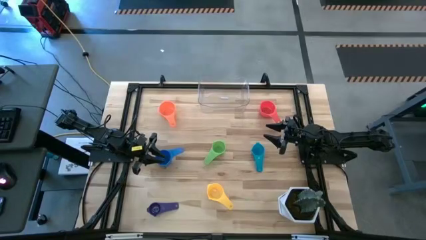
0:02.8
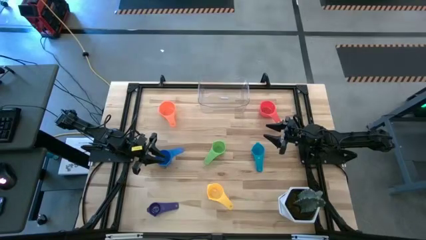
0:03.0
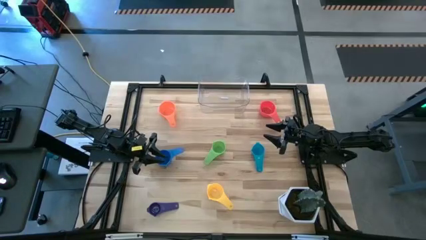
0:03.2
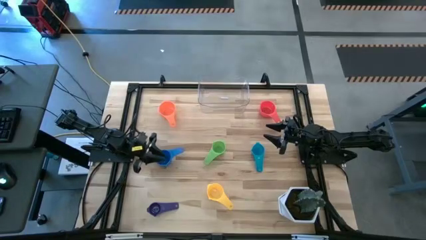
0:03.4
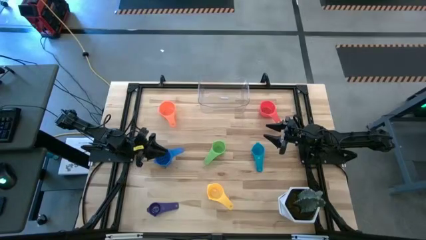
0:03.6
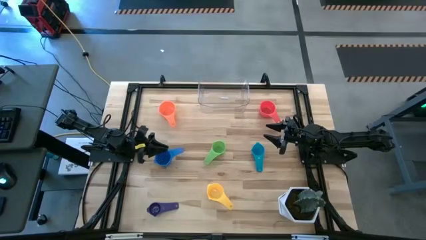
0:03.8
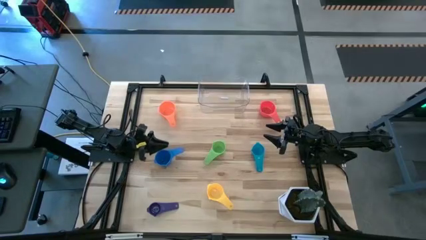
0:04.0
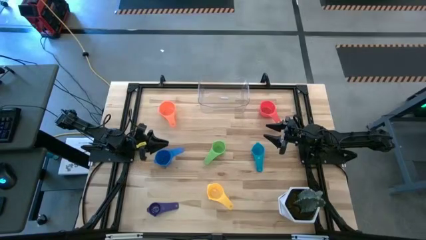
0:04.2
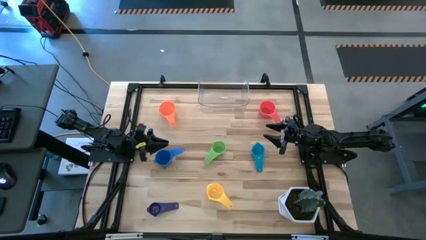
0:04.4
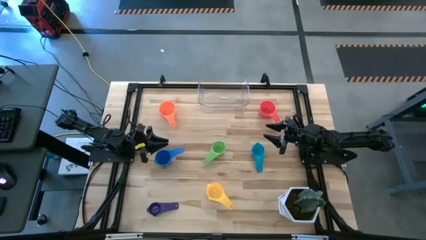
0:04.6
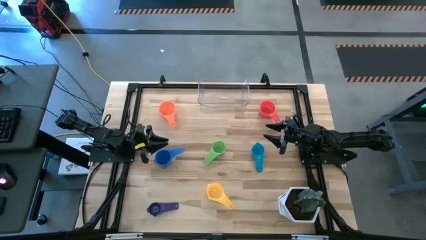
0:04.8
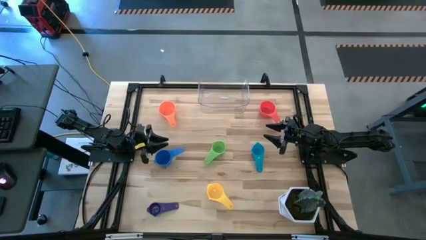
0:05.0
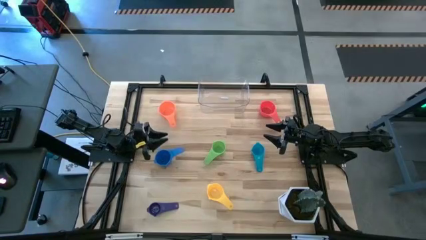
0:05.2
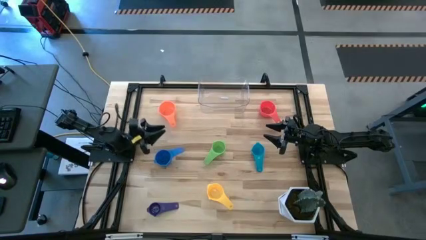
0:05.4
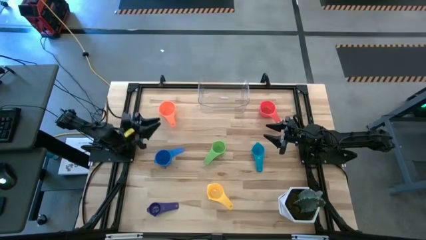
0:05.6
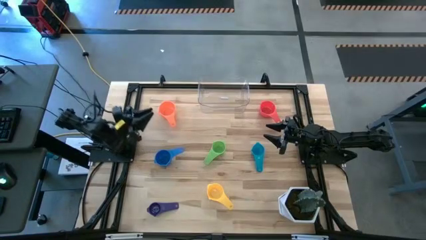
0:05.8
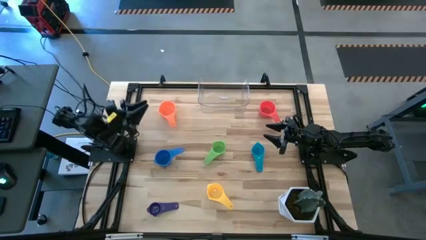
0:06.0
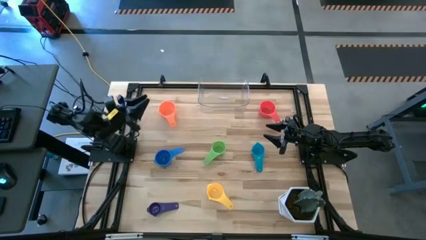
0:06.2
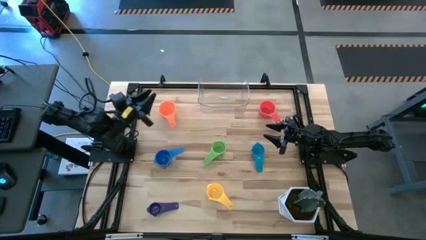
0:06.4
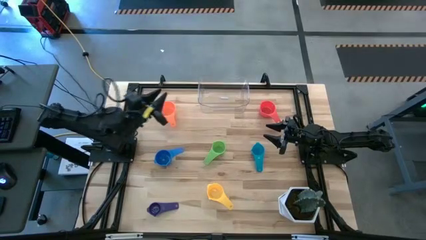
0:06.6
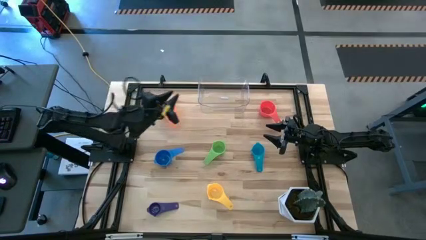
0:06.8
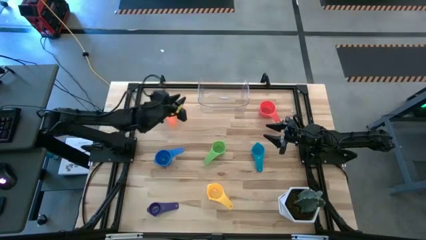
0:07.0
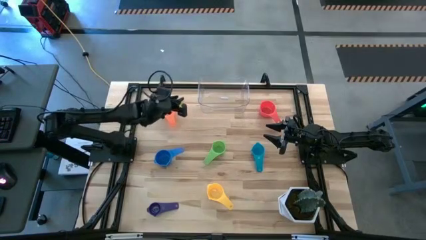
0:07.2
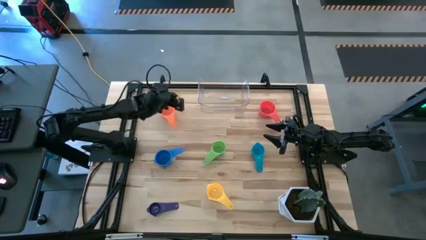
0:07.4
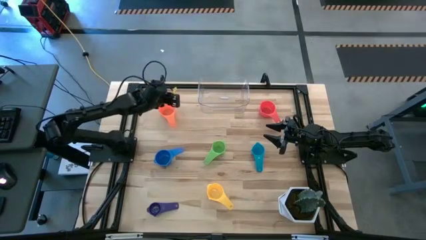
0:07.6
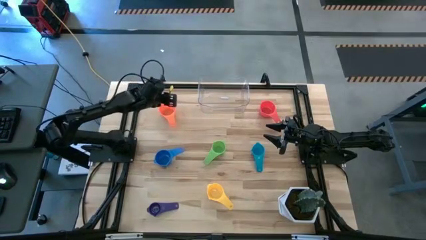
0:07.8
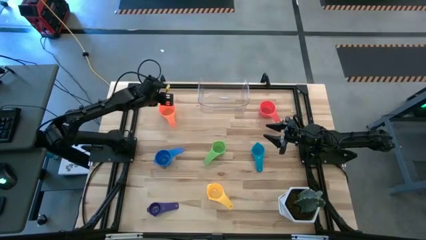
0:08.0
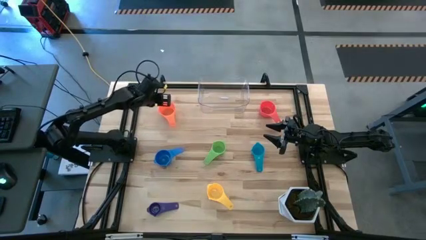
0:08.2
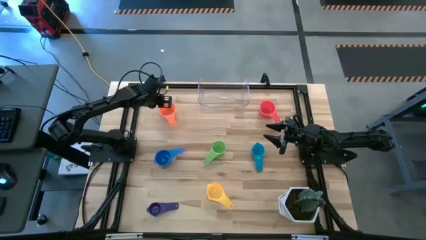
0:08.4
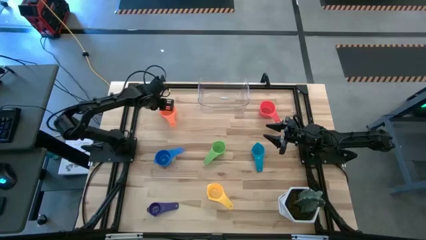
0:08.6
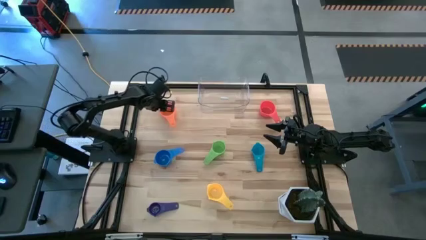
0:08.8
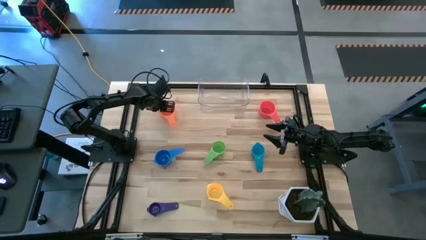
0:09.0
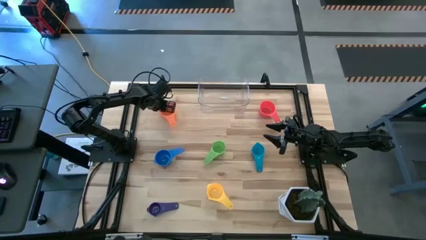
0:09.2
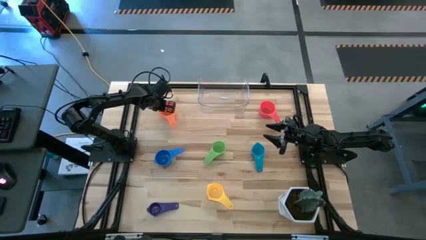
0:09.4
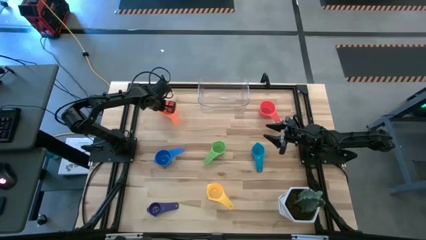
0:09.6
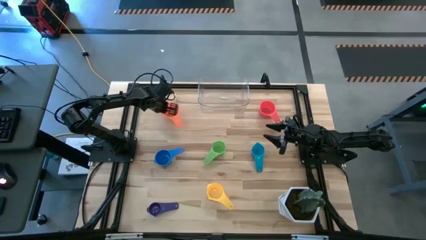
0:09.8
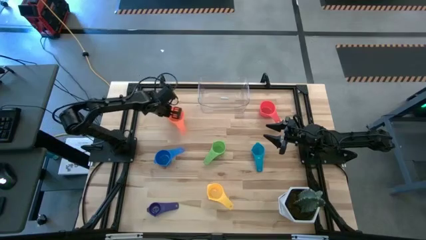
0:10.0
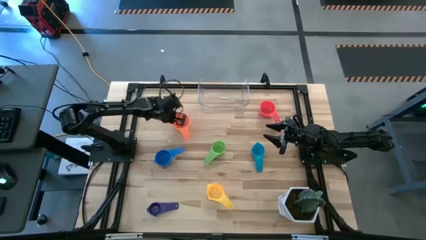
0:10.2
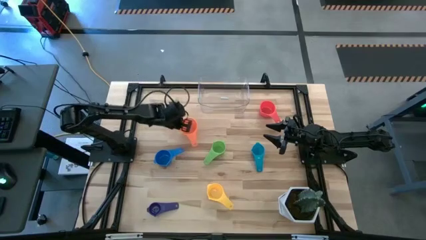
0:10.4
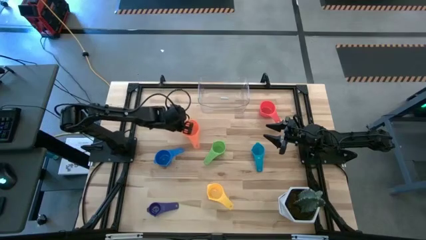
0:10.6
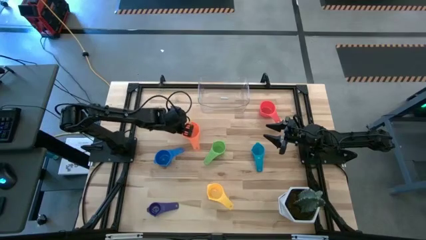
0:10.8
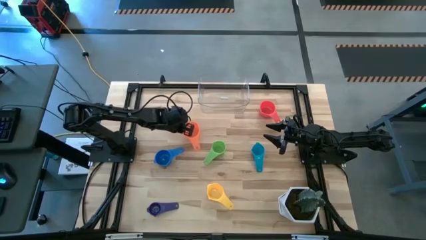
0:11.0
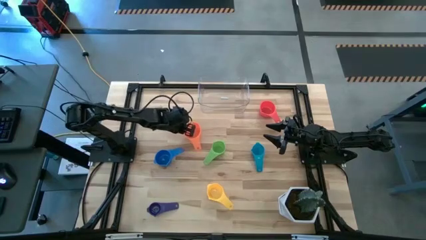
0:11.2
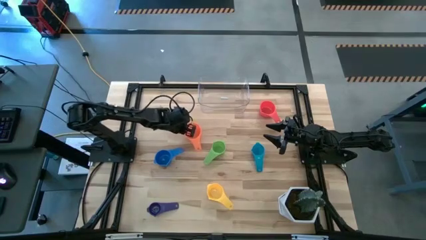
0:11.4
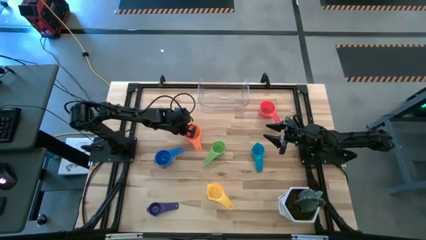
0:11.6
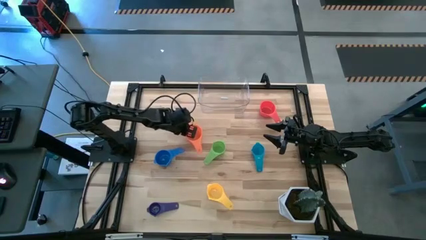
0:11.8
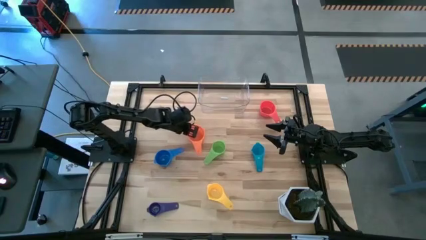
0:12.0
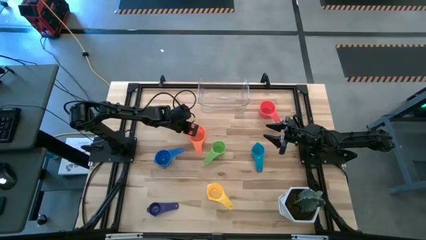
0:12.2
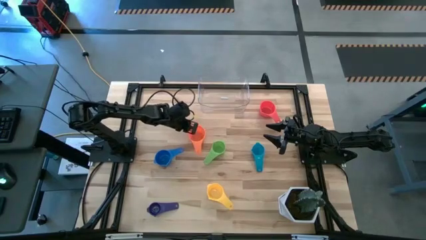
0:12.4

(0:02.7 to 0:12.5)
Task: Nest measuring cups in basket
Move the orange measuring cup to the middle of the table

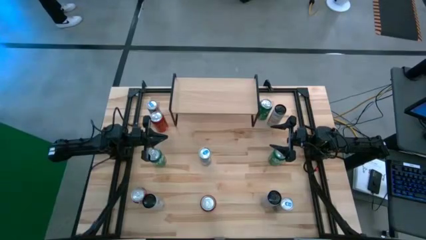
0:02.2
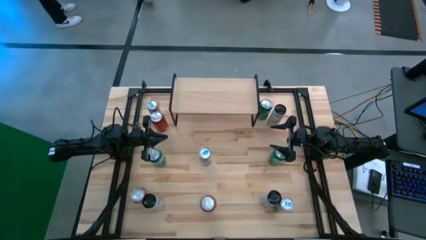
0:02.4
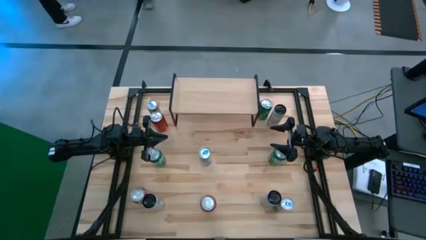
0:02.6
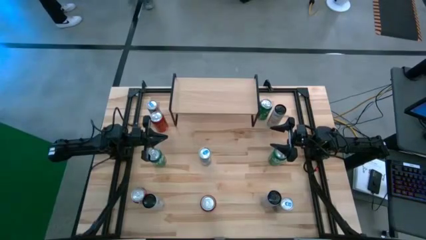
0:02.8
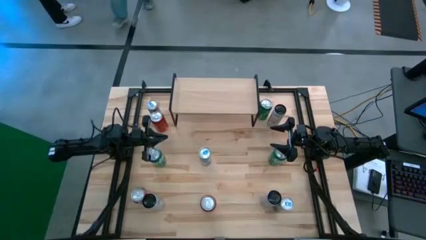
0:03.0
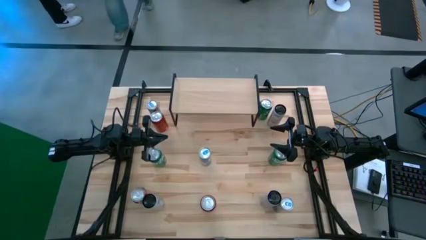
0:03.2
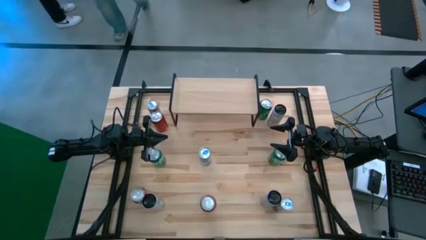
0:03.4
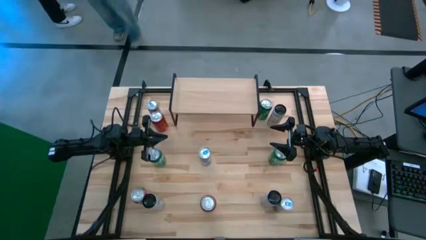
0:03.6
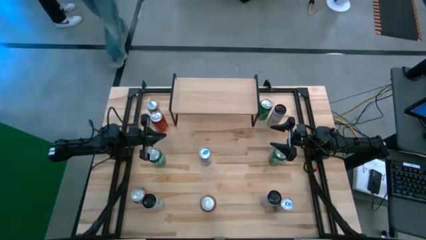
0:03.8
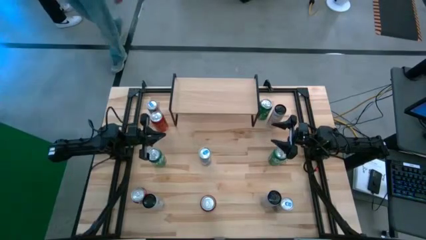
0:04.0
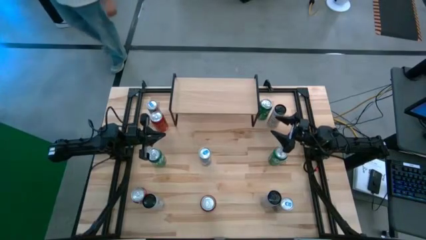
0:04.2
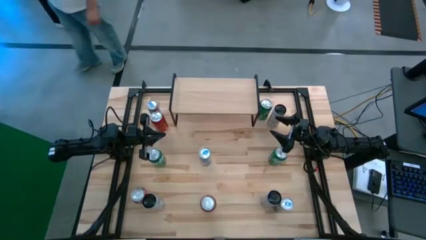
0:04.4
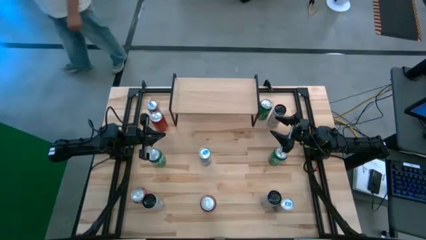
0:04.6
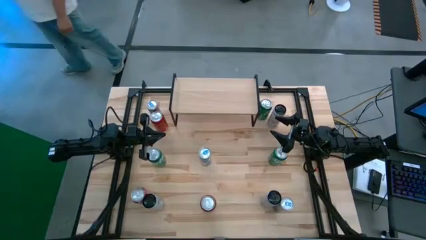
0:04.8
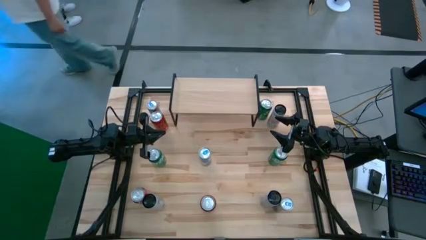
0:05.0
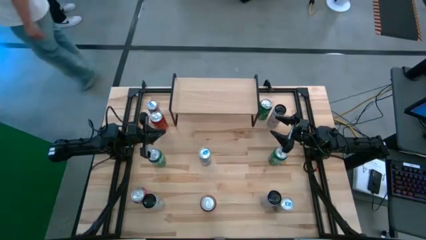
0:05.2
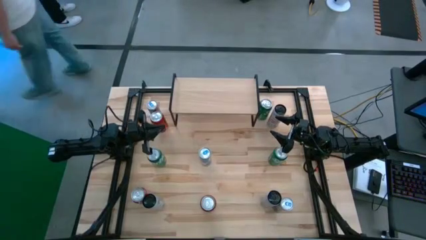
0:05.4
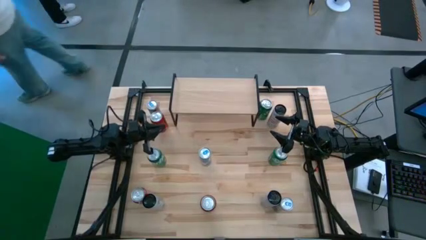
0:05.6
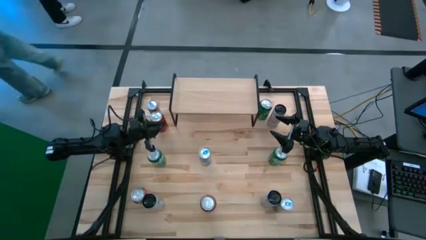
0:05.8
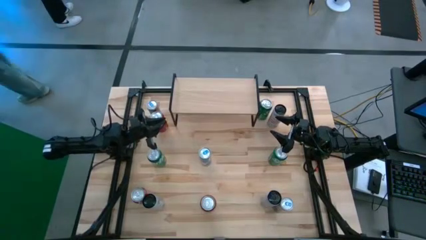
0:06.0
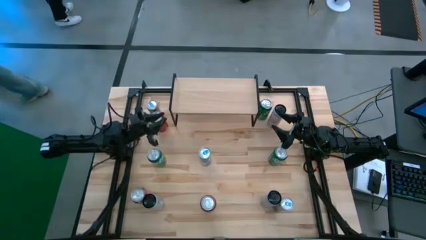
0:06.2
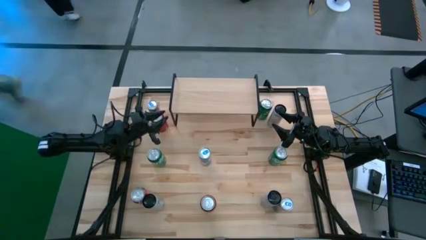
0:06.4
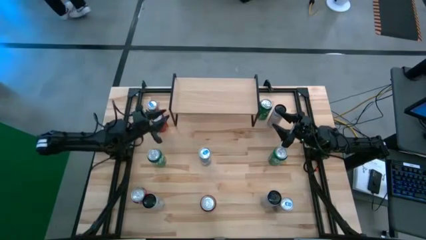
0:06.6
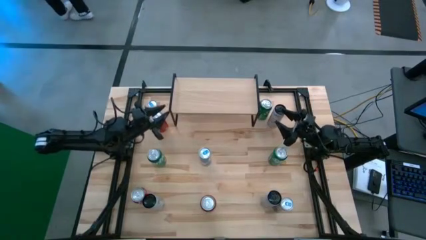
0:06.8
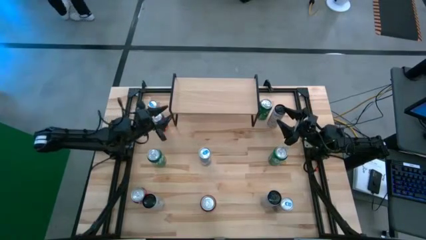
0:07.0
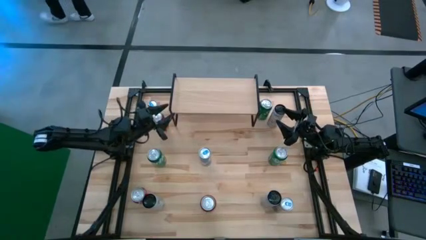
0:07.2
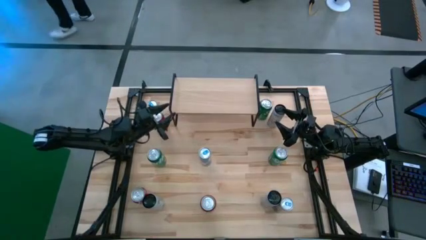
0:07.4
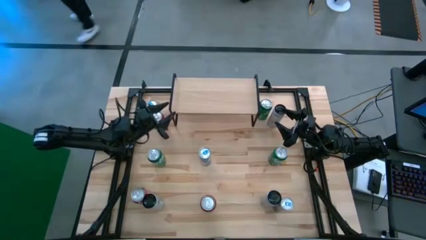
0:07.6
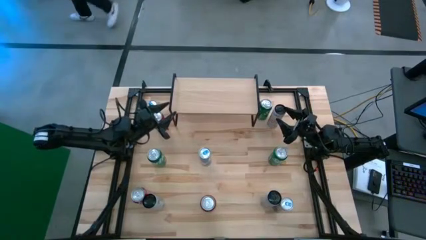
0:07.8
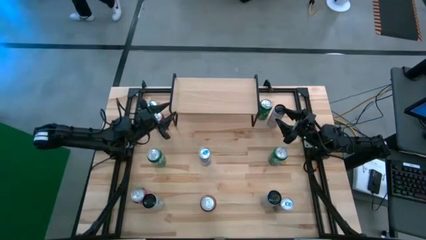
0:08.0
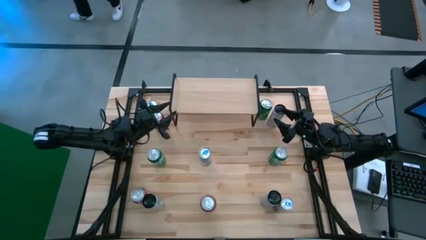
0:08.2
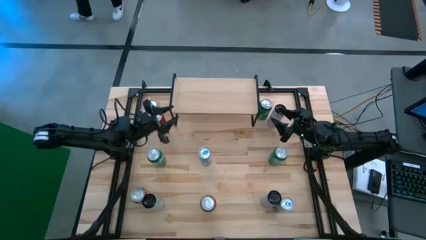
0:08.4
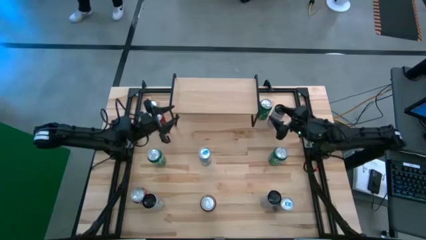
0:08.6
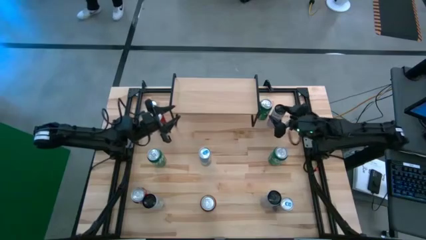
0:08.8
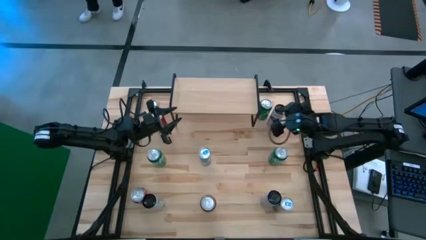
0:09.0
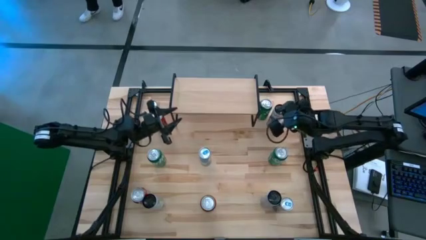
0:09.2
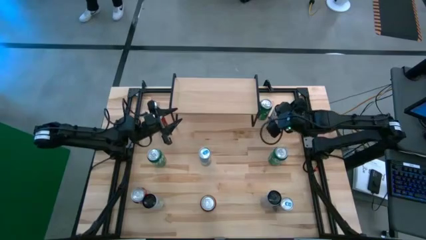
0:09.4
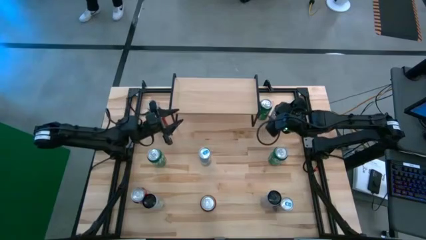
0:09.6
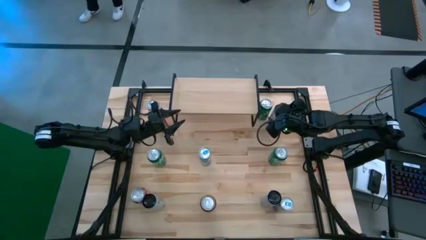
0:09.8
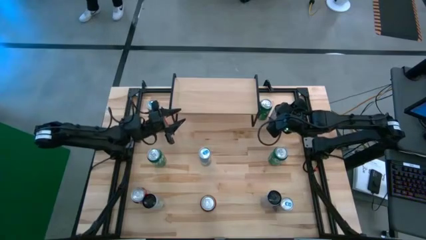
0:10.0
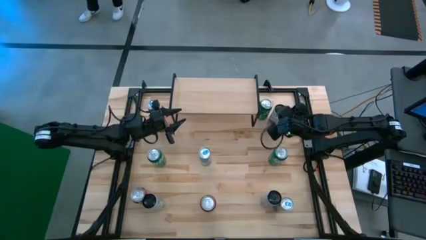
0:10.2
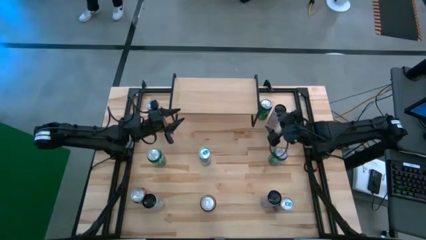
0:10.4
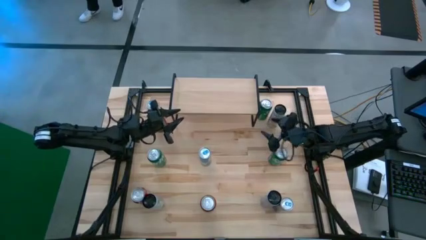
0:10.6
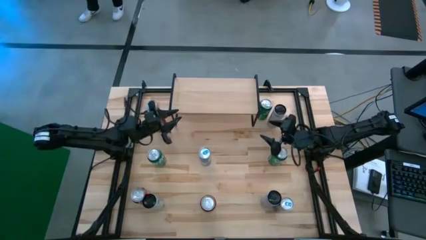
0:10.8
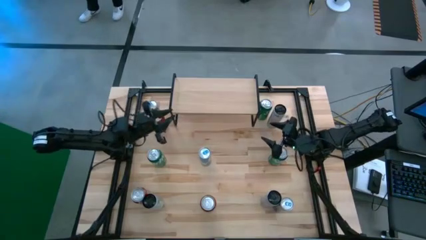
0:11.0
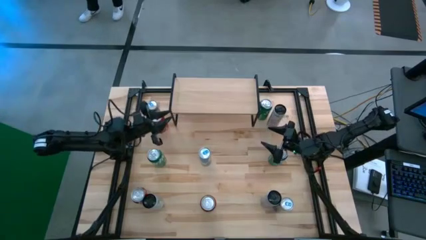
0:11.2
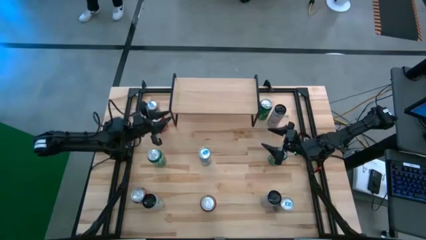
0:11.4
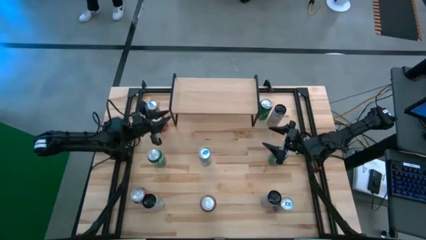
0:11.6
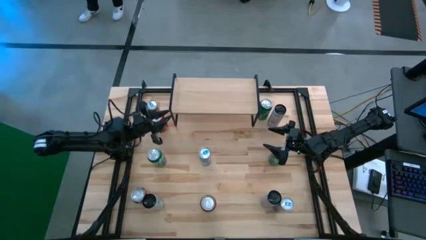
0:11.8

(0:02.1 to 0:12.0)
Task: Place canned beverage on shelf
Put the top right white pink soda can on the shelf
